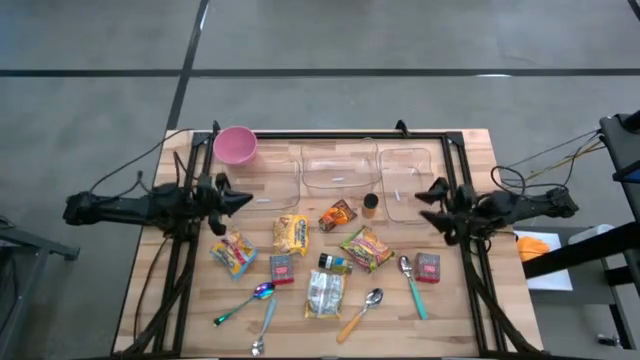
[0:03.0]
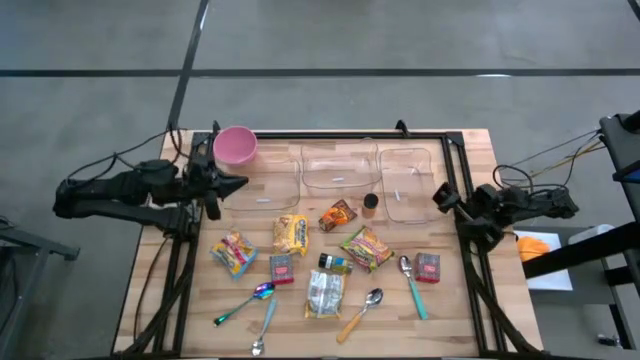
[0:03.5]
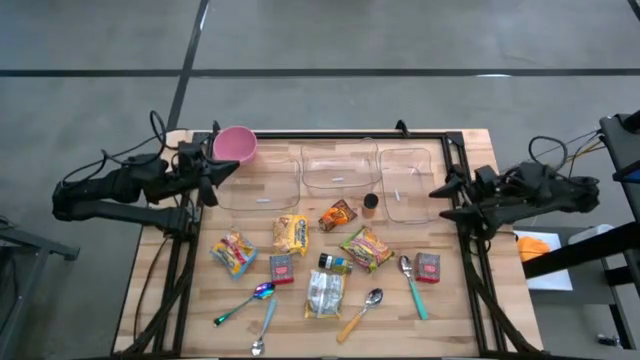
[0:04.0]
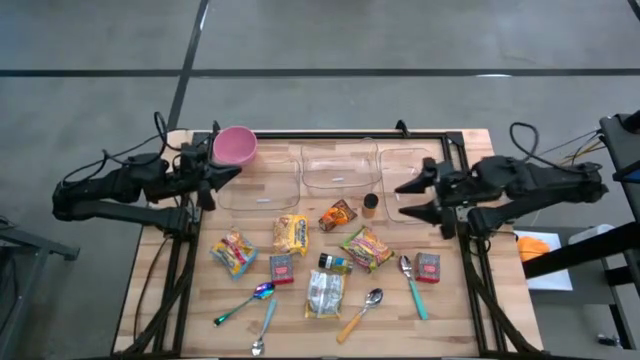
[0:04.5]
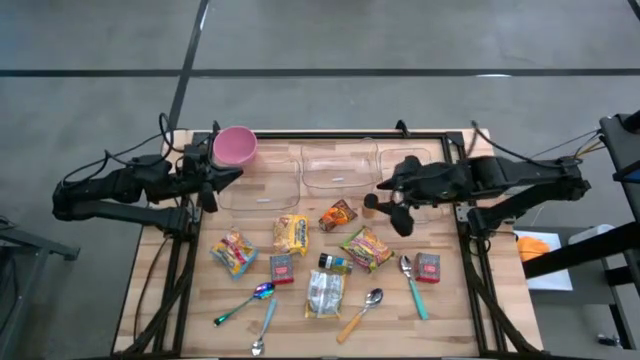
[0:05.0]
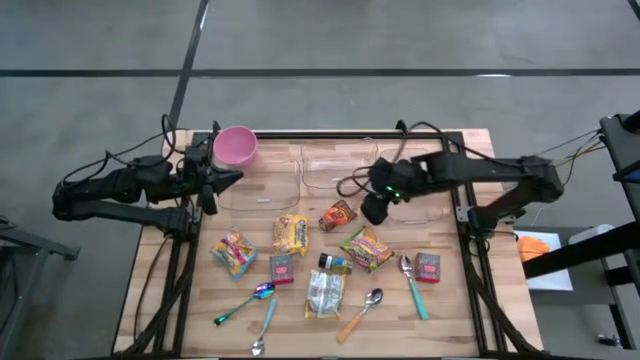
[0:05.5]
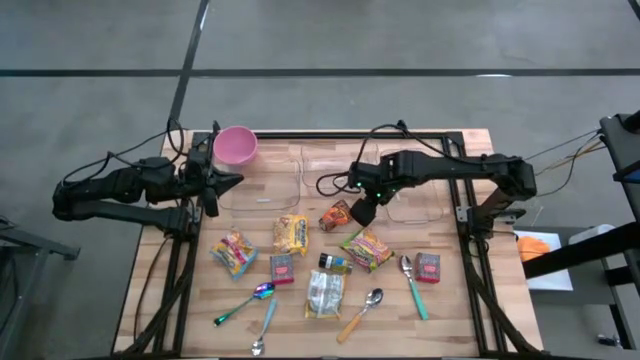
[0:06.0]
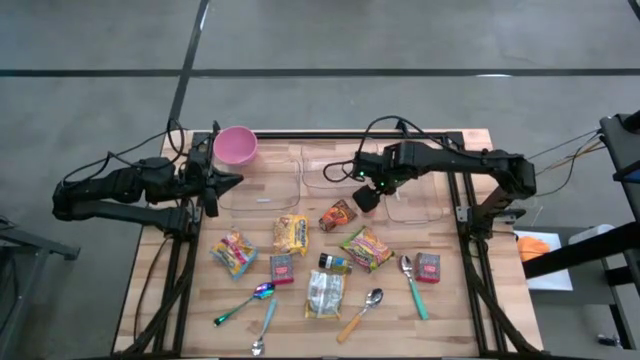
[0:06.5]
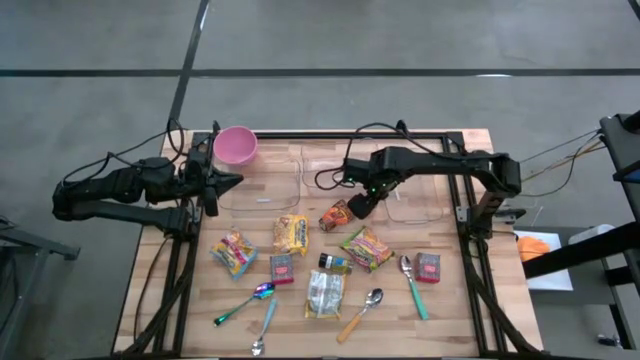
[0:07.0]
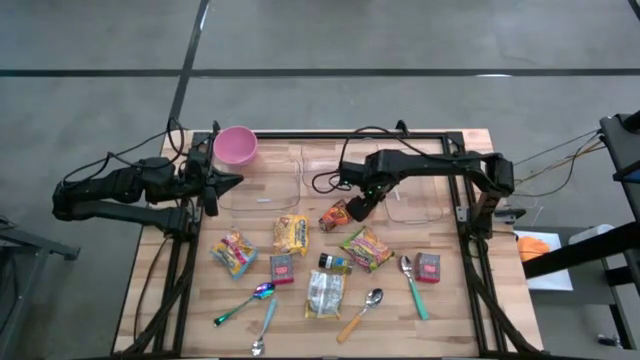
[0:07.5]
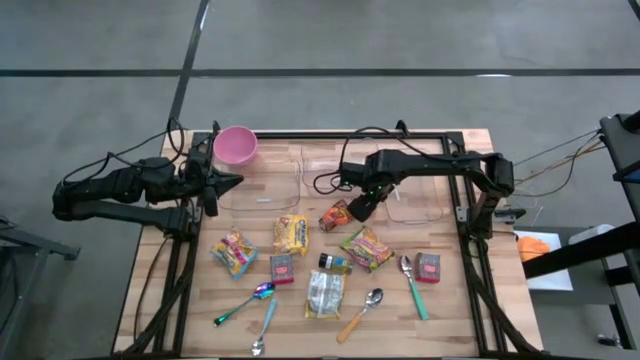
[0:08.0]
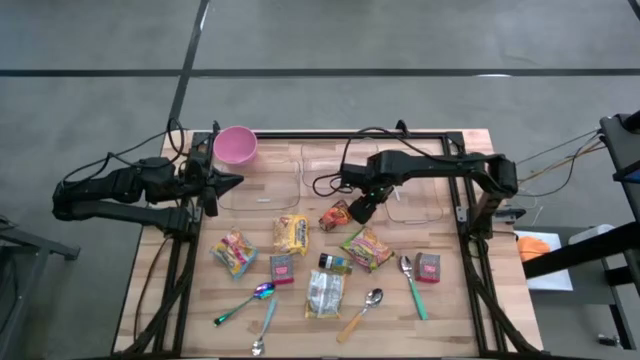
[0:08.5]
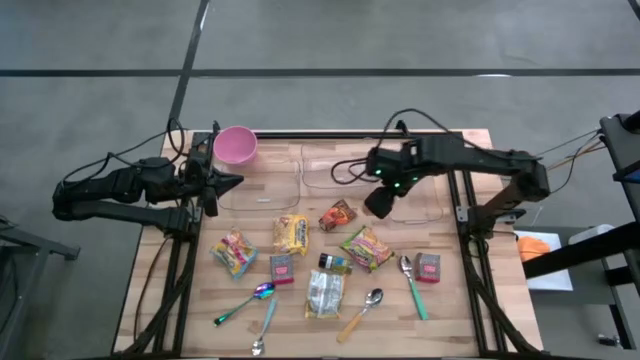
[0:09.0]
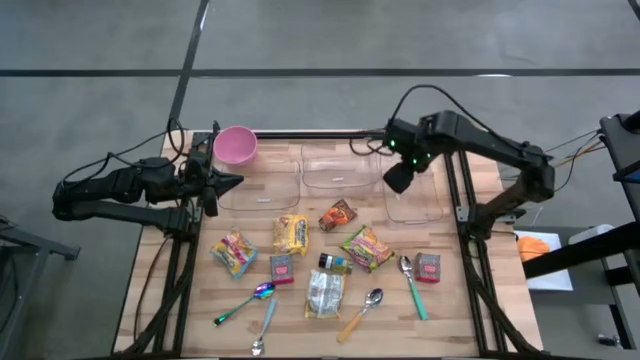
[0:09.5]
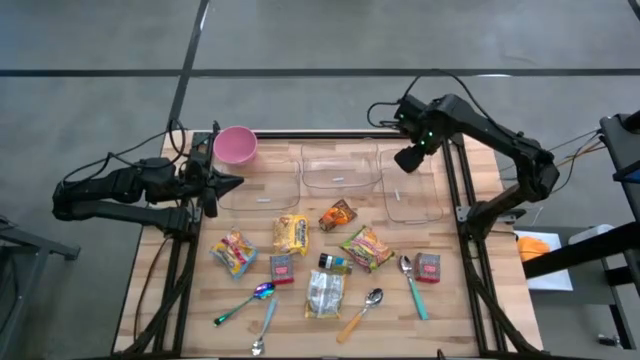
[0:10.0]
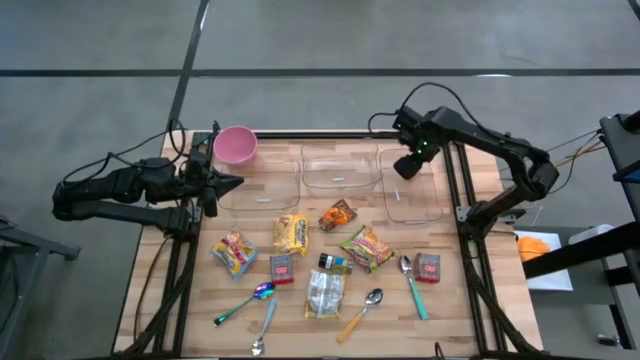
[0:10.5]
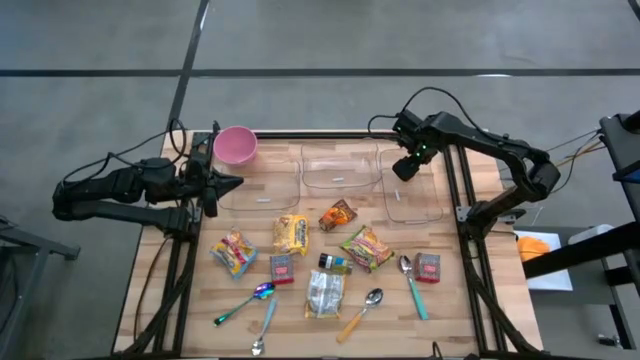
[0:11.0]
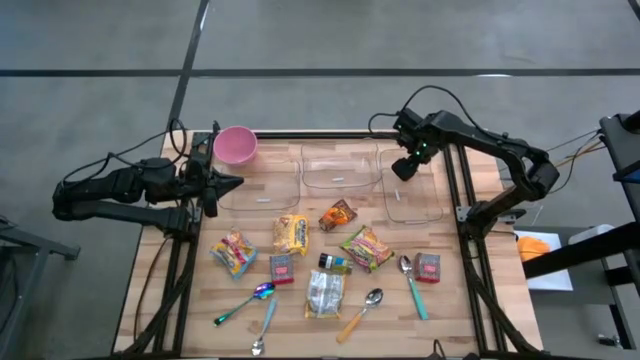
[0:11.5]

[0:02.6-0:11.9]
Put the orange seasoning bottle into the right transparent bin

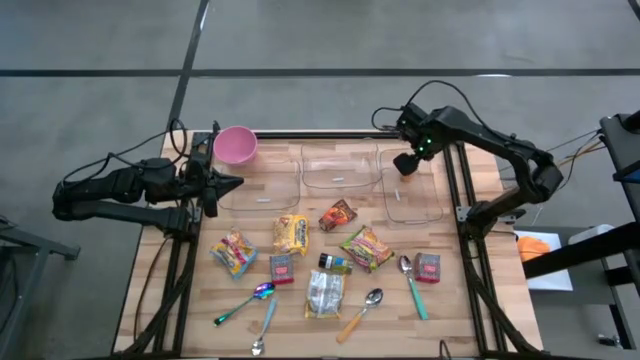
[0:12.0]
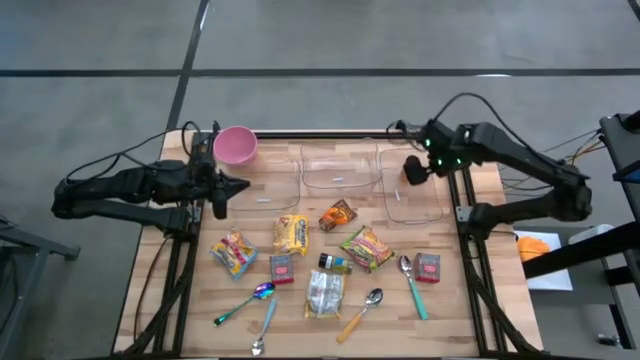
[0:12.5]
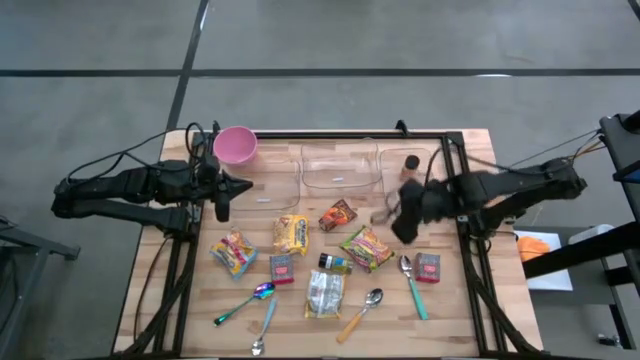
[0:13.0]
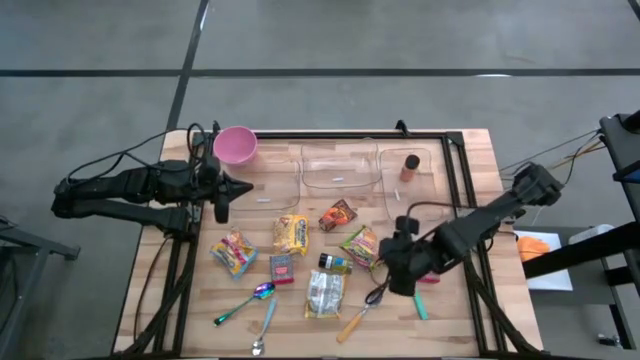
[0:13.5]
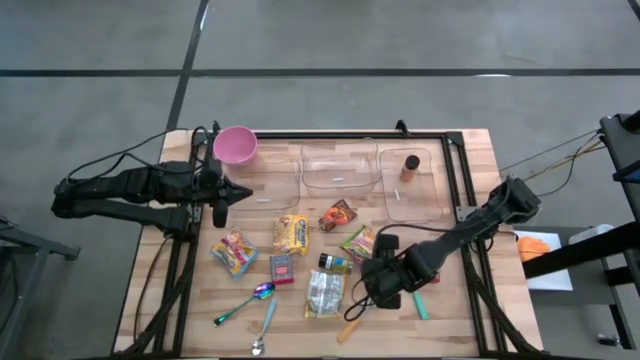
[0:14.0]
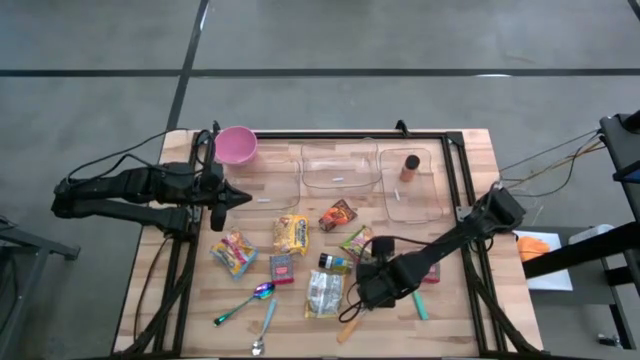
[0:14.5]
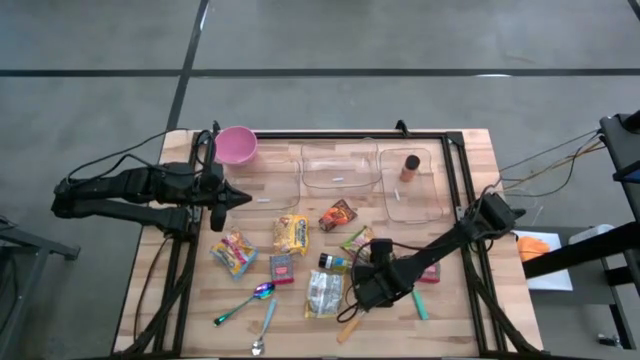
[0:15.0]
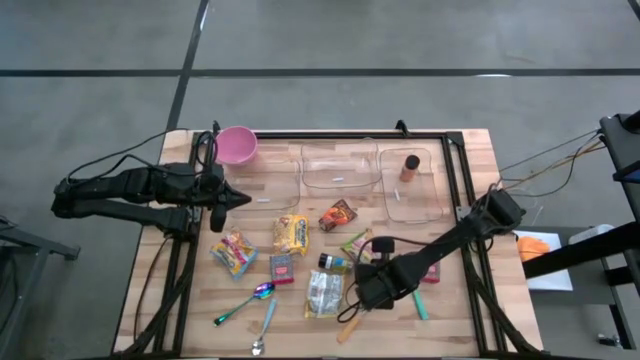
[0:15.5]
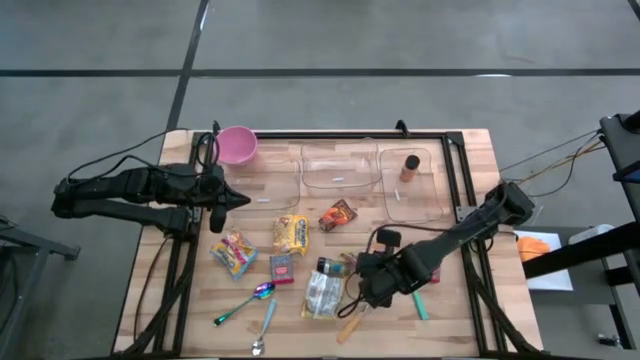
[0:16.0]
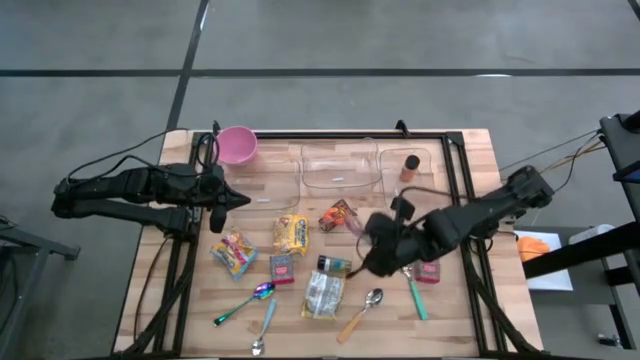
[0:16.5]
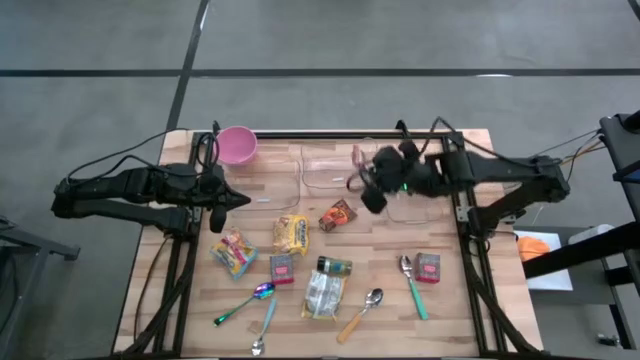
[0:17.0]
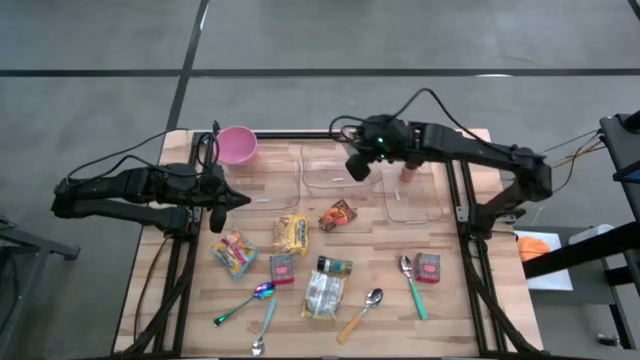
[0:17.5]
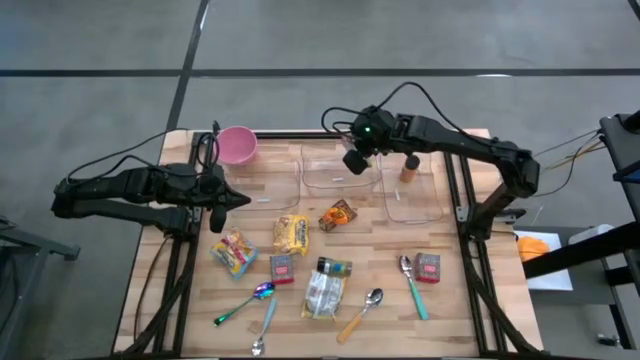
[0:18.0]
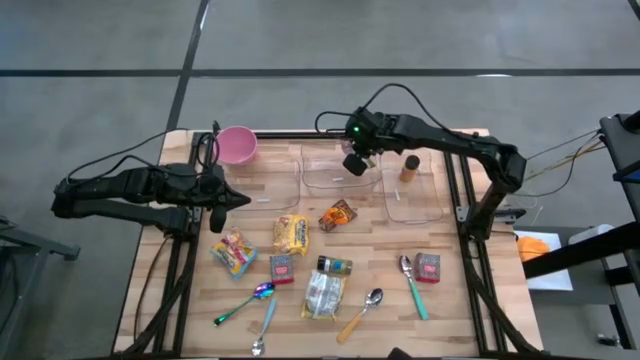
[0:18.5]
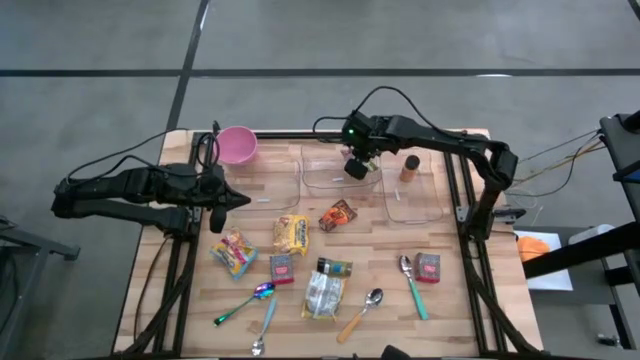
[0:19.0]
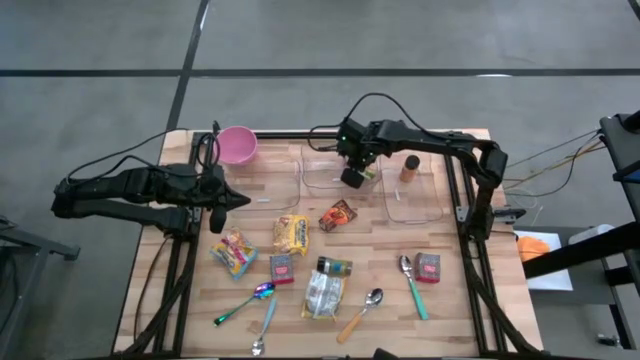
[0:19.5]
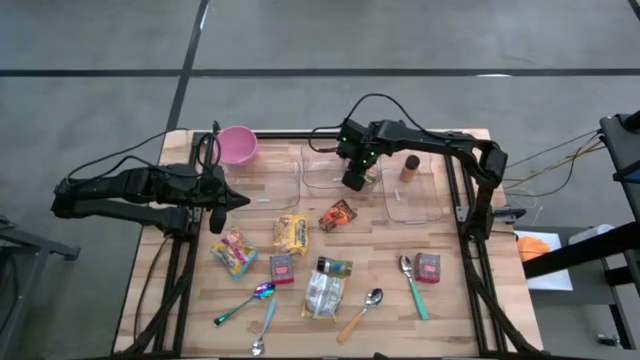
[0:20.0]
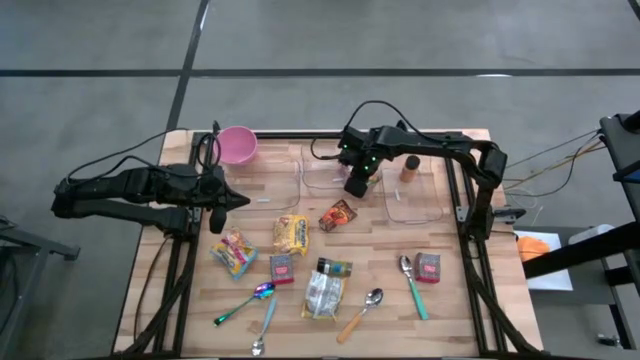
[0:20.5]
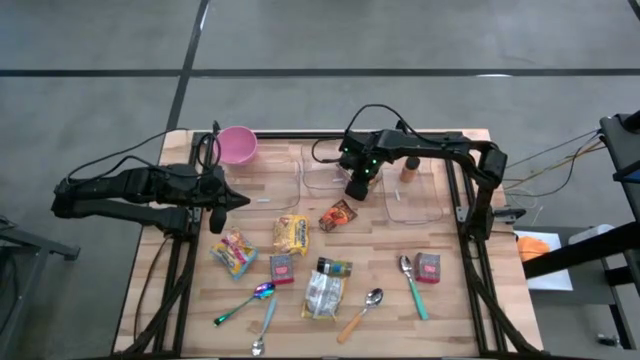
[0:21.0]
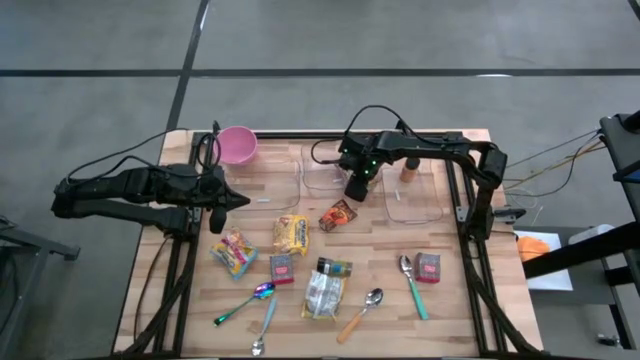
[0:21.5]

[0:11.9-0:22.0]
Put the green noodle pack into the middle transparent bin

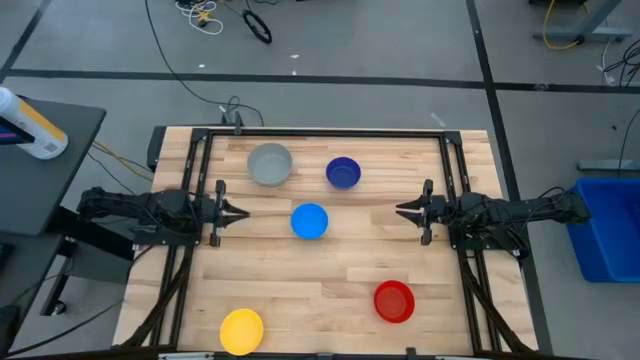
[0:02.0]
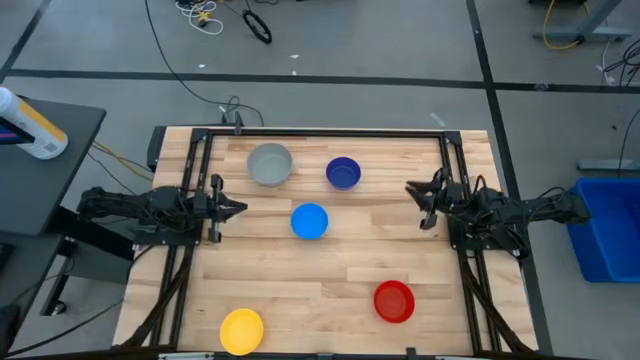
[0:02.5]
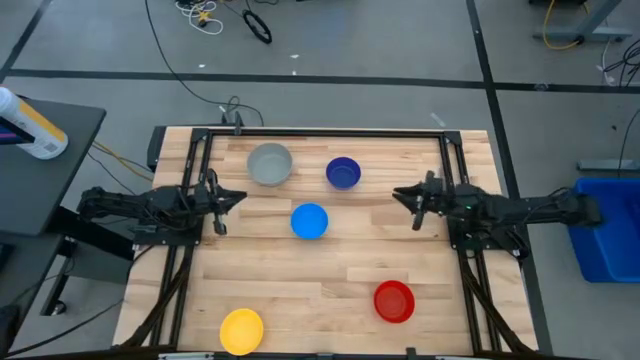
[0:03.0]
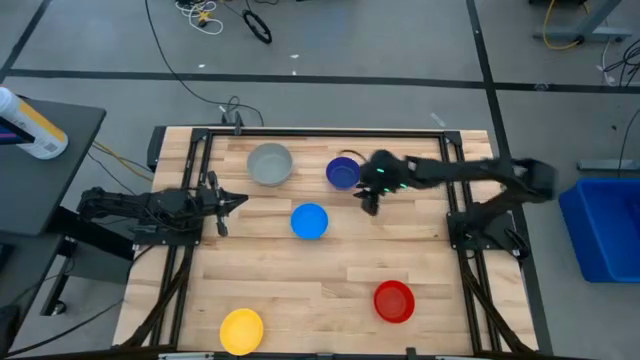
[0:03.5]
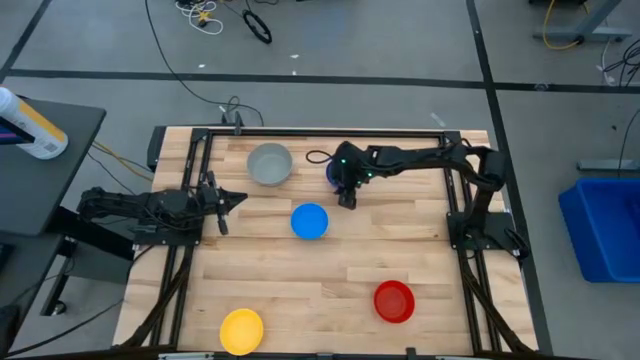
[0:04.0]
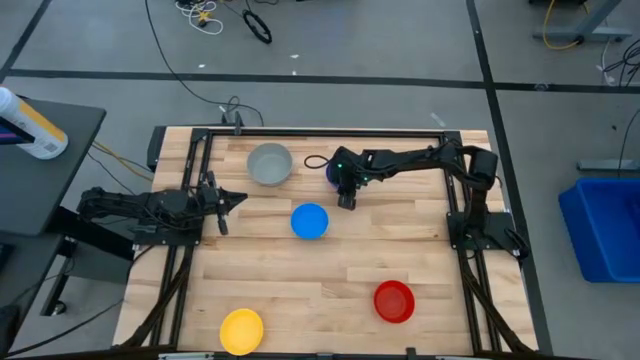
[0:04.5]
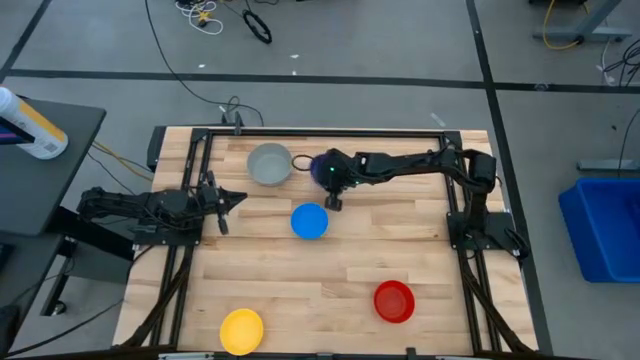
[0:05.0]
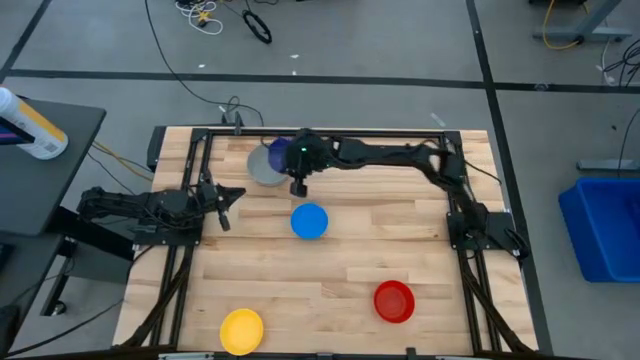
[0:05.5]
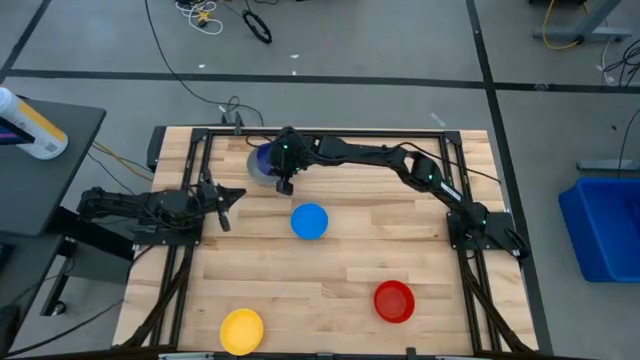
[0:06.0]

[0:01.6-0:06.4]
Stack the dark blue bowl on the gray bowl
